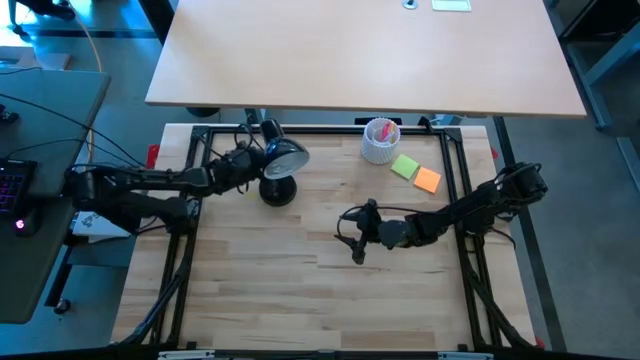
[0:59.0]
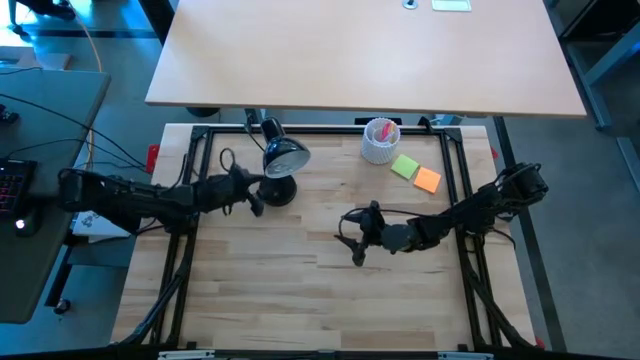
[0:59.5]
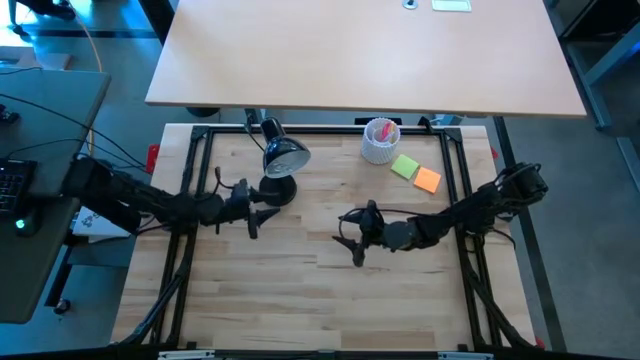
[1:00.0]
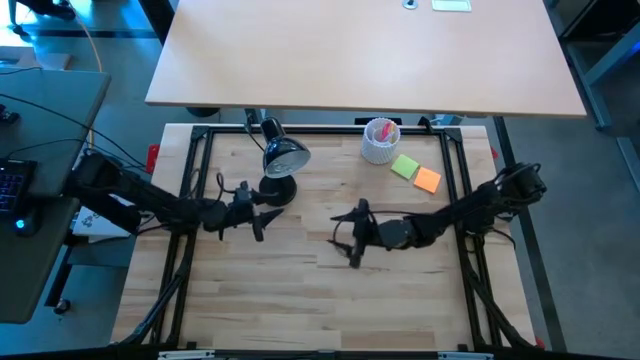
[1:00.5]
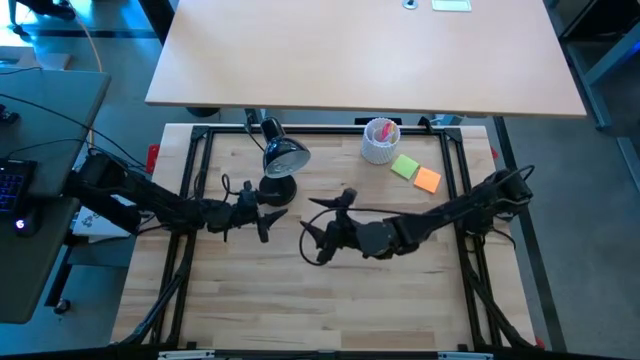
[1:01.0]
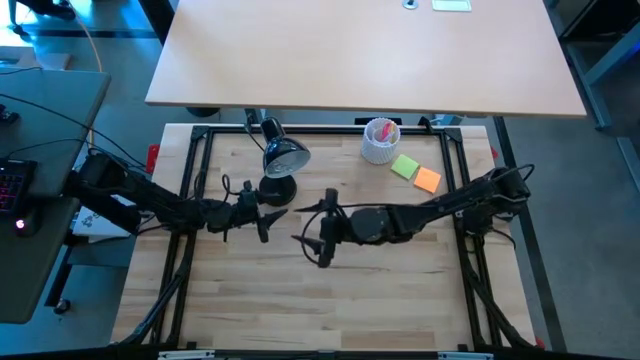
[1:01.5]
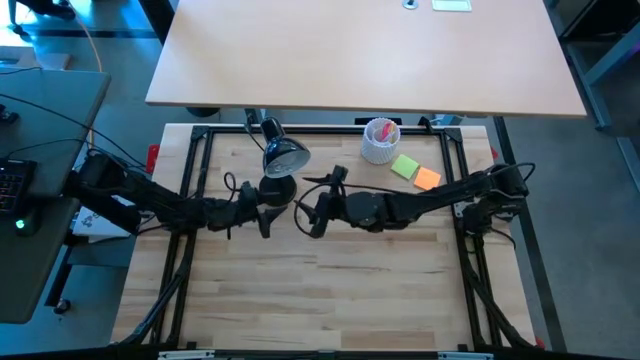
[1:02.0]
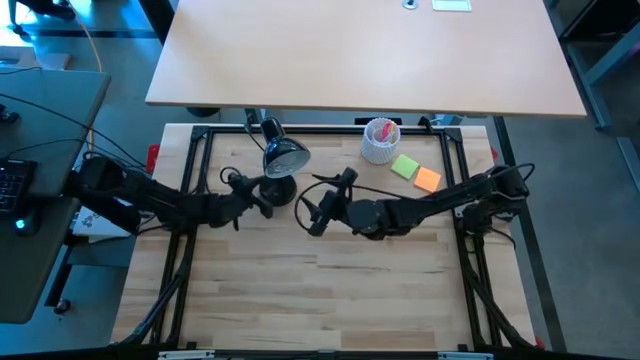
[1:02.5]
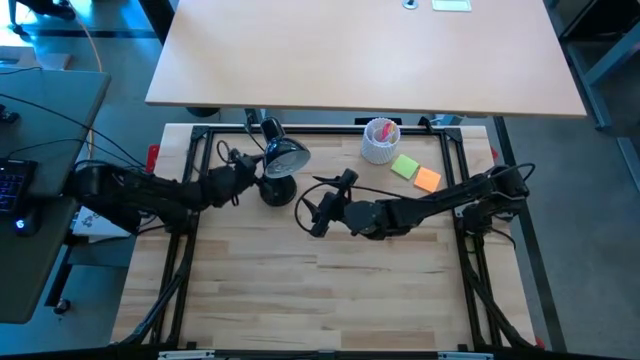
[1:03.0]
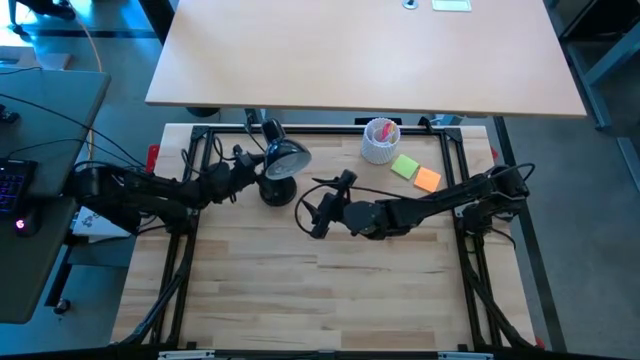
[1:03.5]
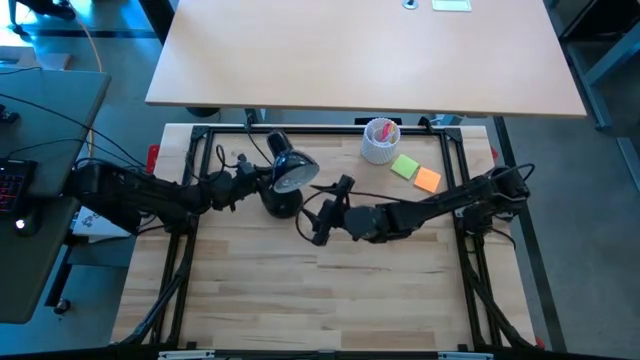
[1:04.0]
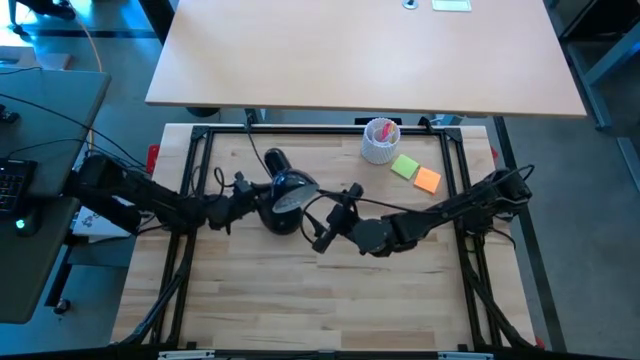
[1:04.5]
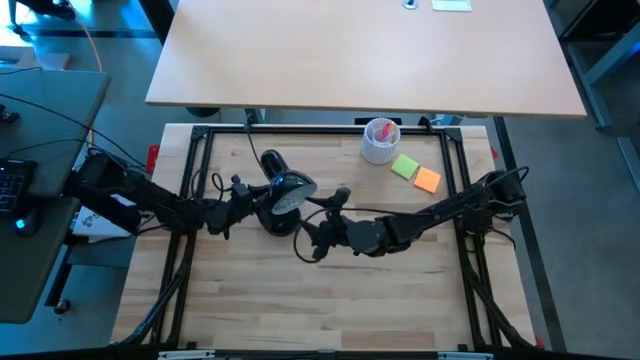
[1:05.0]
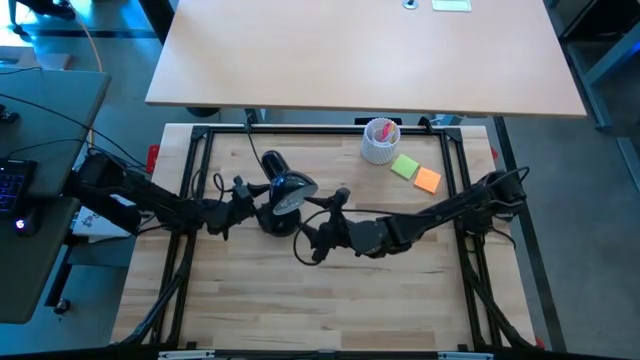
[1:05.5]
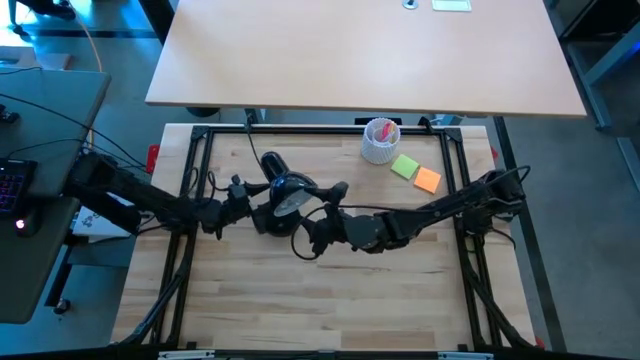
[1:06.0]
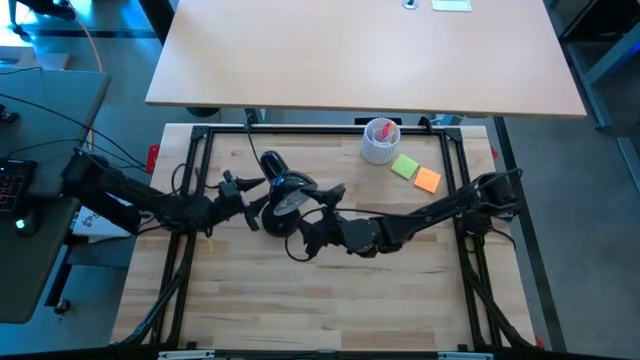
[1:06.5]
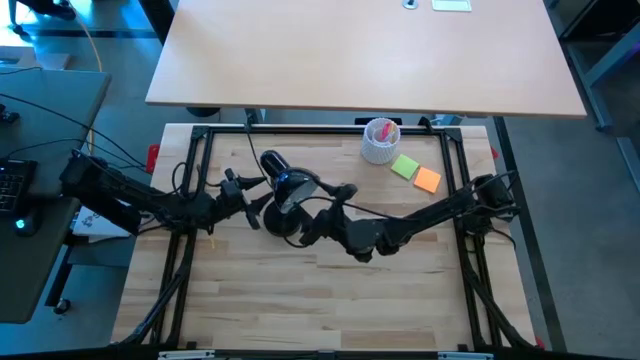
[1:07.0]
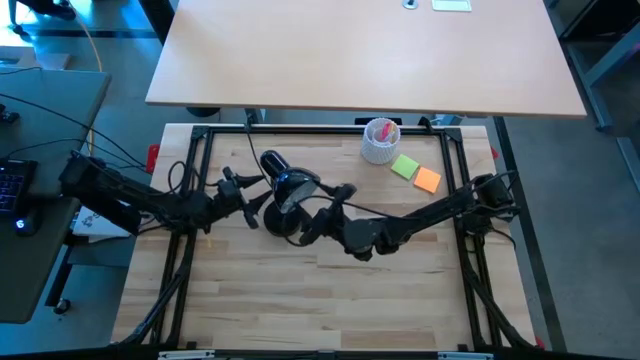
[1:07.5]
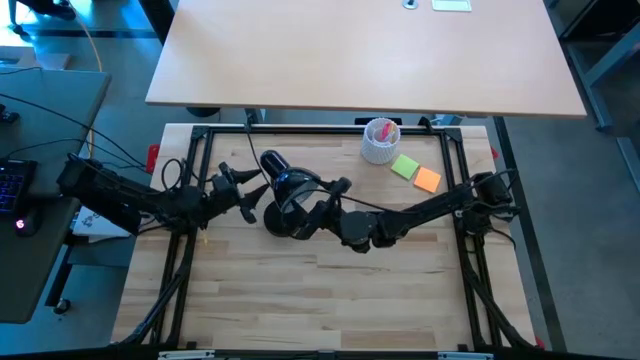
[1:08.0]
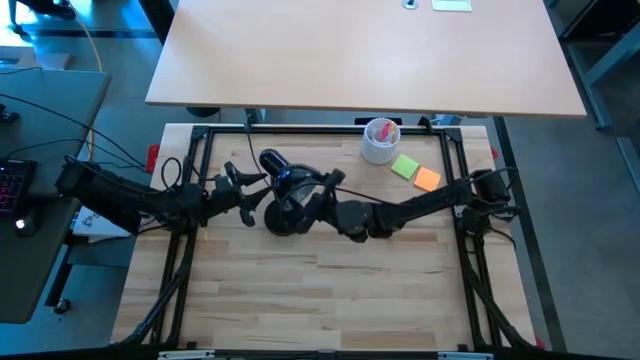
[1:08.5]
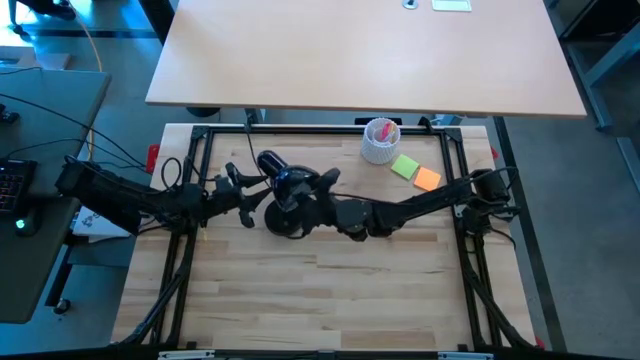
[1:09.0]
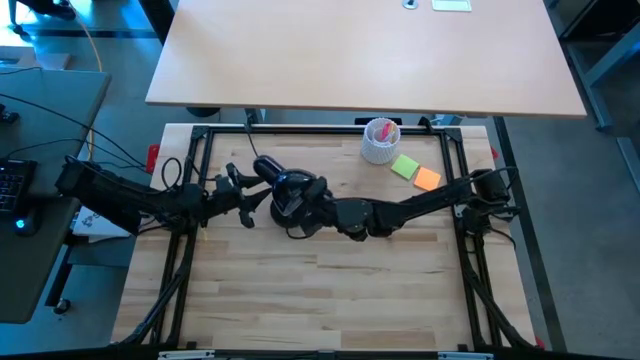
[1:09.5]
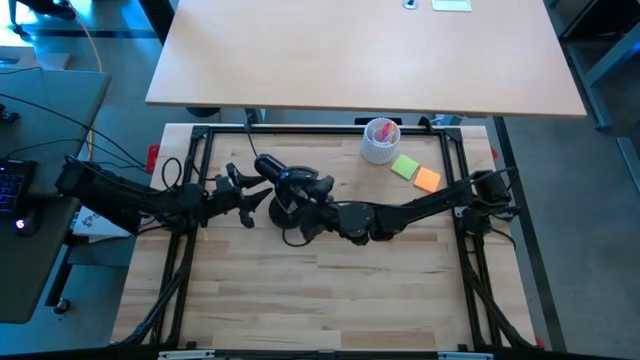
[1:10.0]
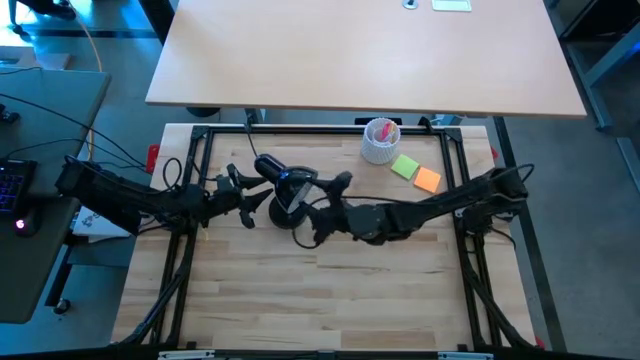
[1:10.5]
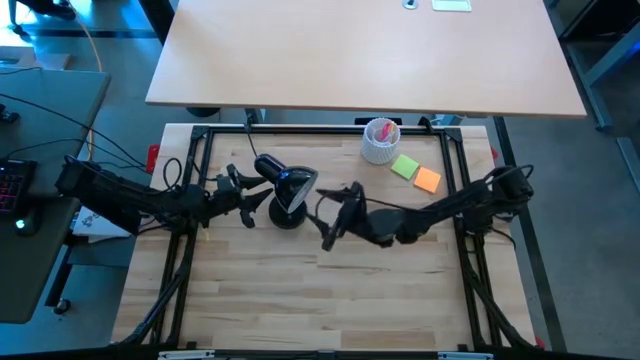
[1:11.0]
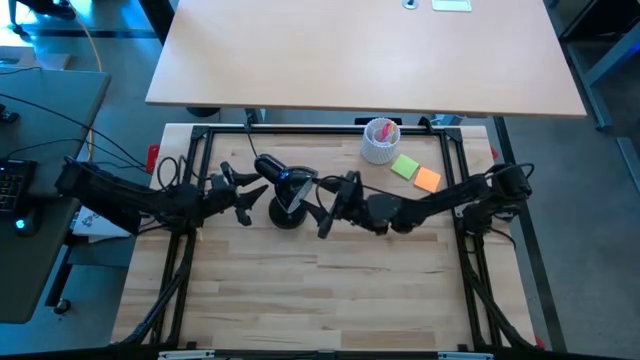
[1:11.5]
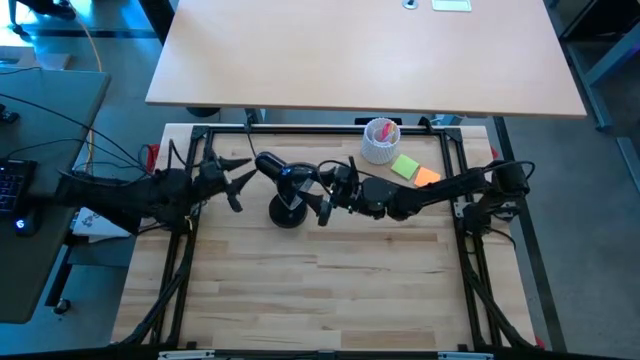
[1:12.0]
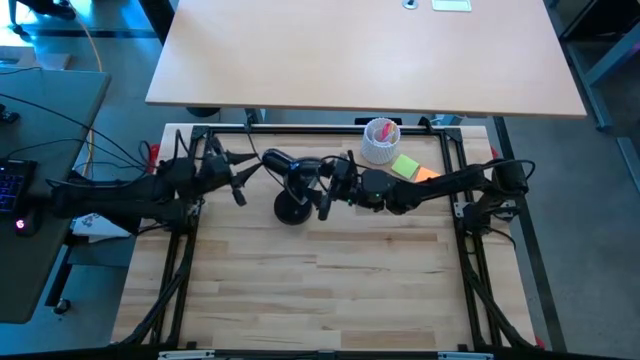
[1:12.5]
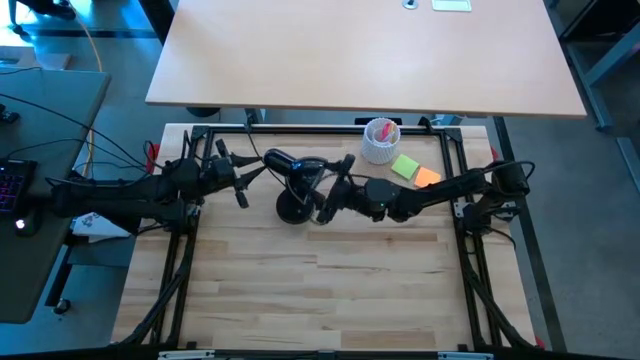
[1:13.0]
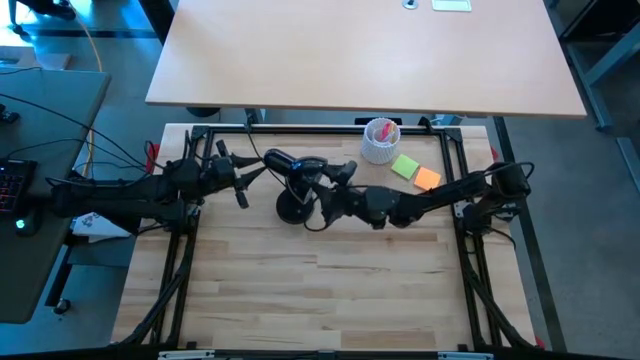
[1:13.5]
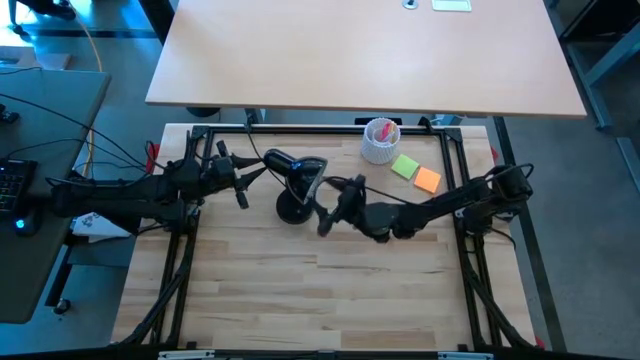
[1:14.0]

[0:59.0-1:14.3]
Task: Screw lightbulb
Remove the lightbulb from the lamp

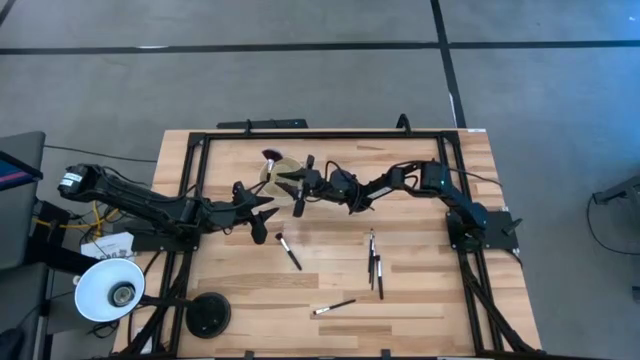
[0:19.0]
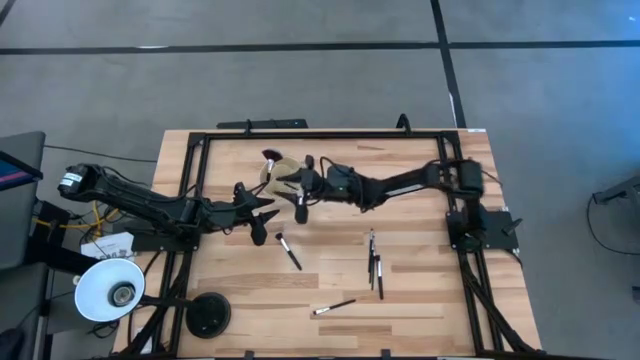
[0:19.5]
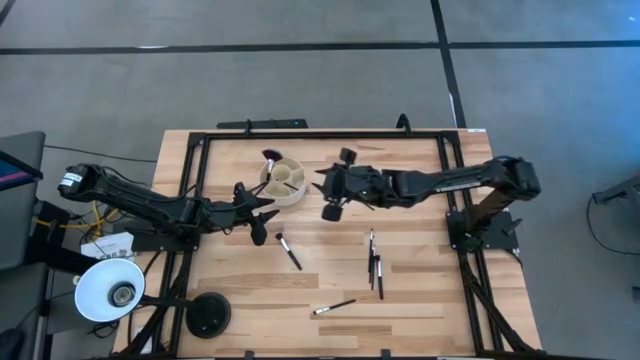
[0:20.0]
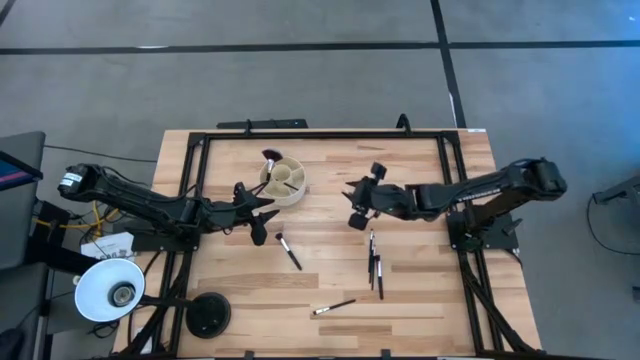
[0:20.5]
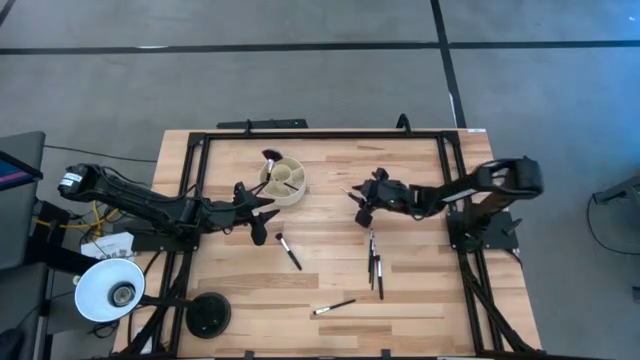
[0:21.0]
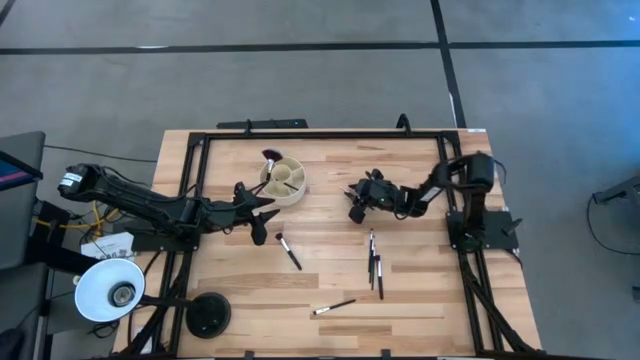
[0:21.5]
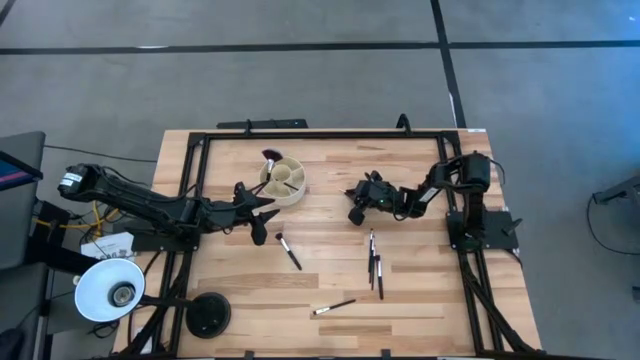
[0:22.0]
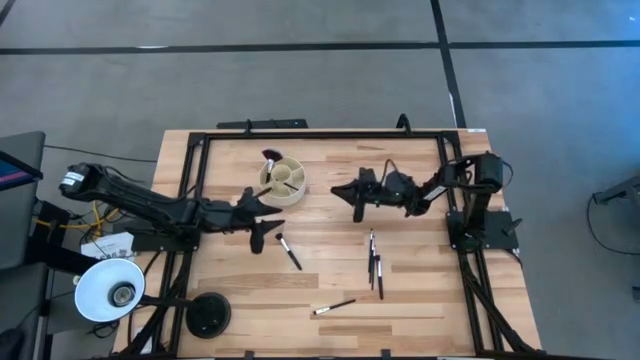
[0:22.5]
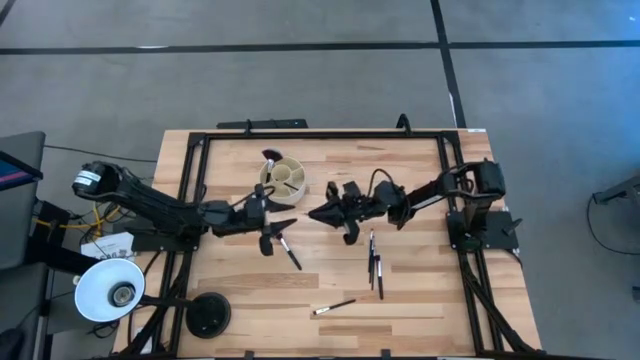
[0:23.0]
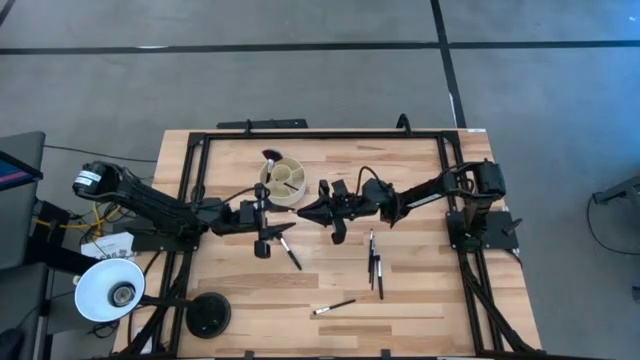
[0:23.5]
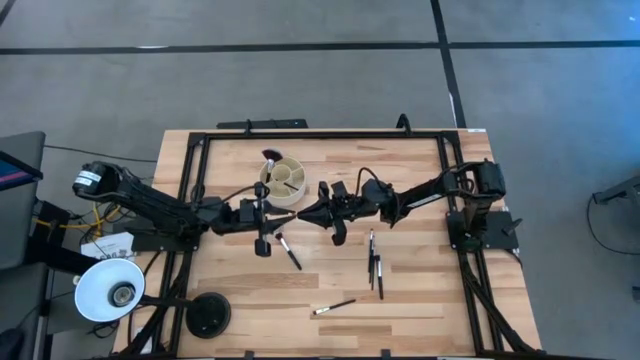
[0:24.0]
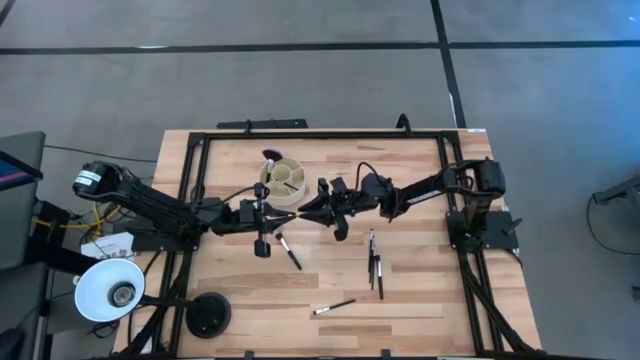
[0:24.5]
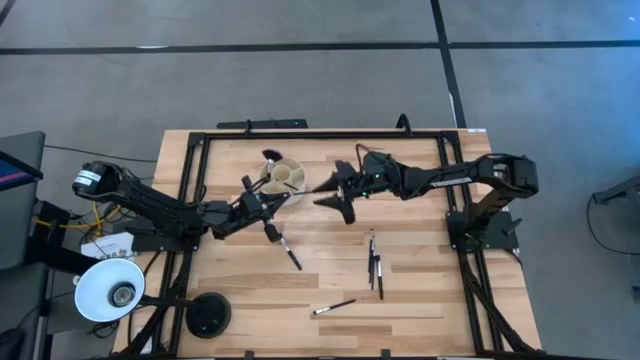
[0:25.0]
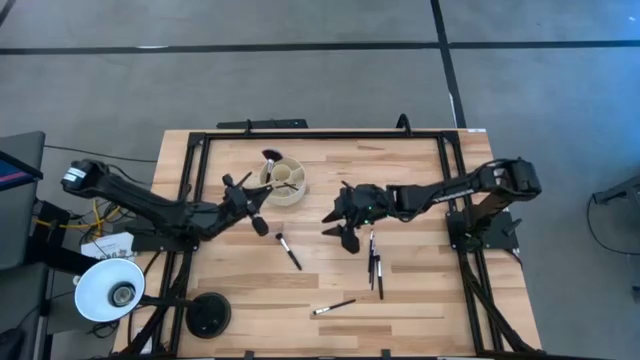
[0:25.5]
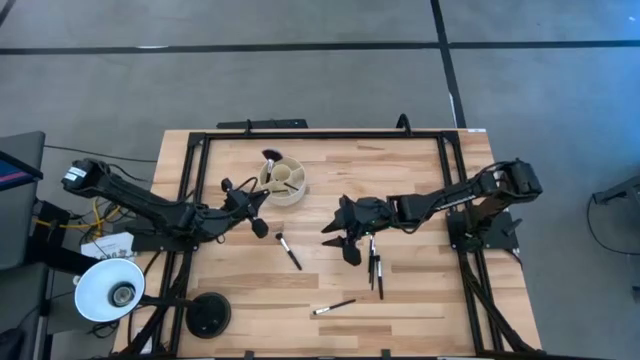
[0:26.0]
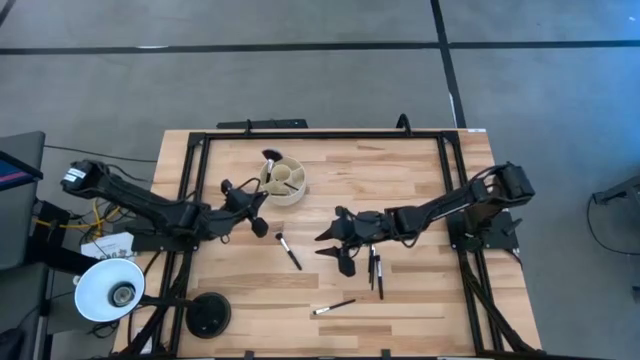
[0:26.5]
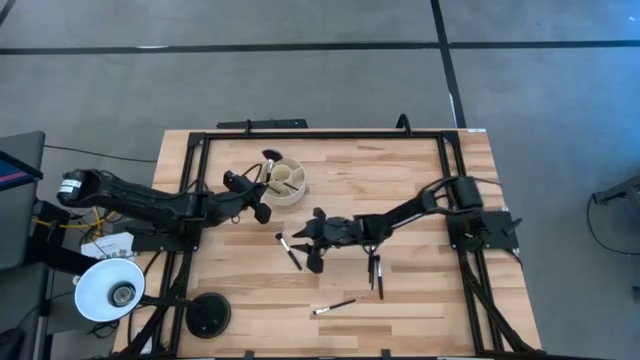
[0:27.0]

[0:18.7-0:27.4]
Task: Sort items
Put the black eyeshadow brush in the white organizer
